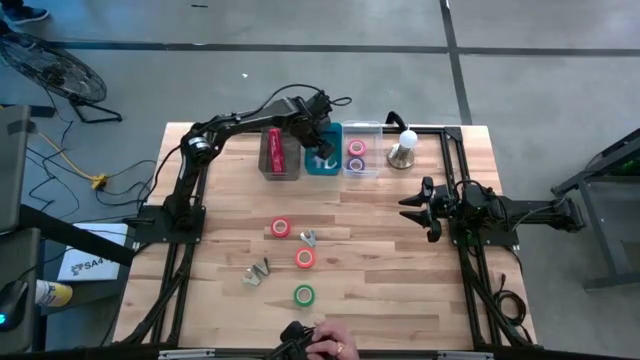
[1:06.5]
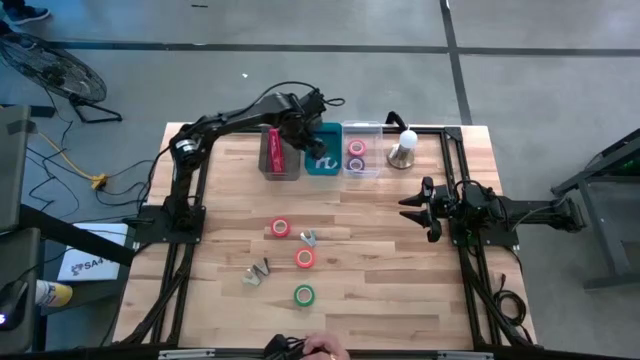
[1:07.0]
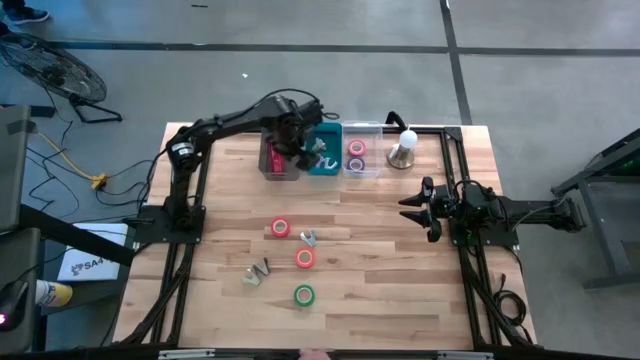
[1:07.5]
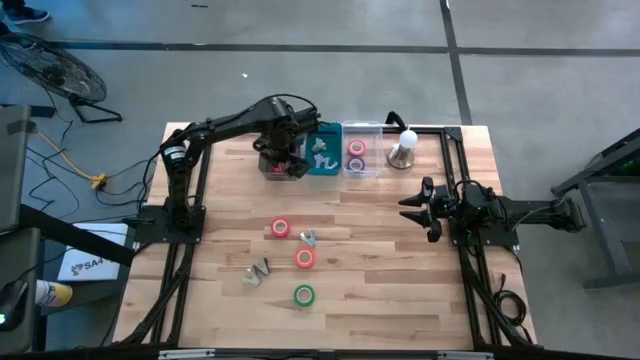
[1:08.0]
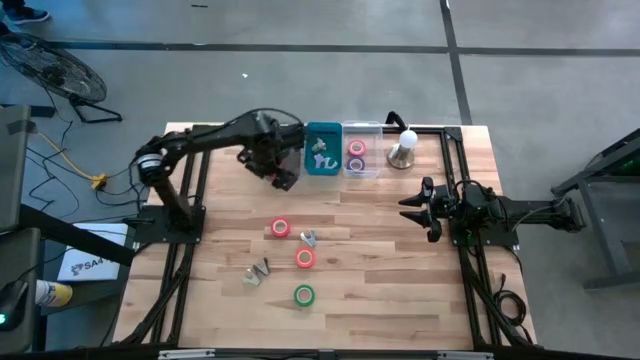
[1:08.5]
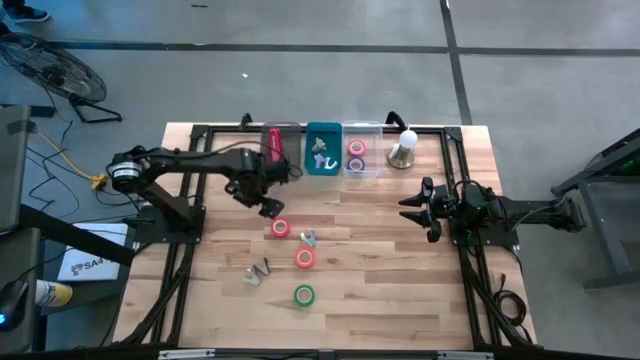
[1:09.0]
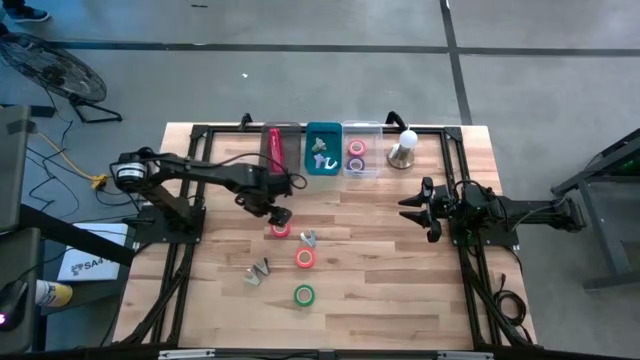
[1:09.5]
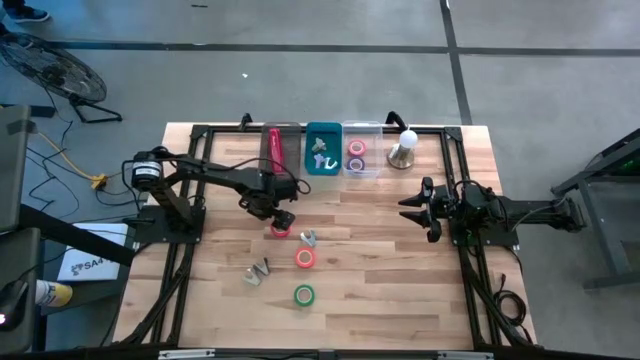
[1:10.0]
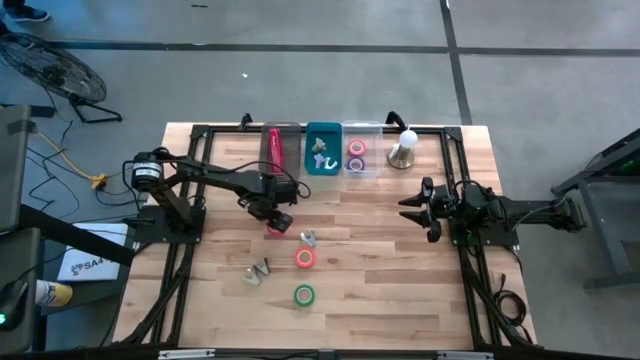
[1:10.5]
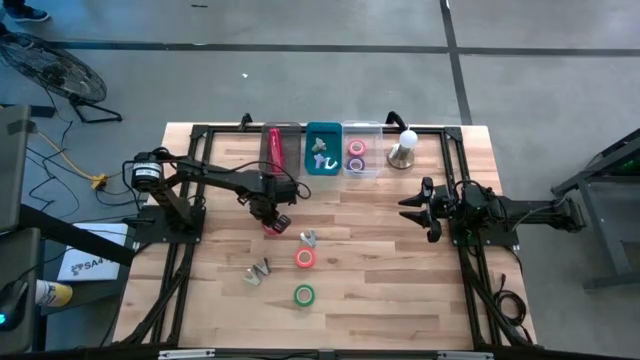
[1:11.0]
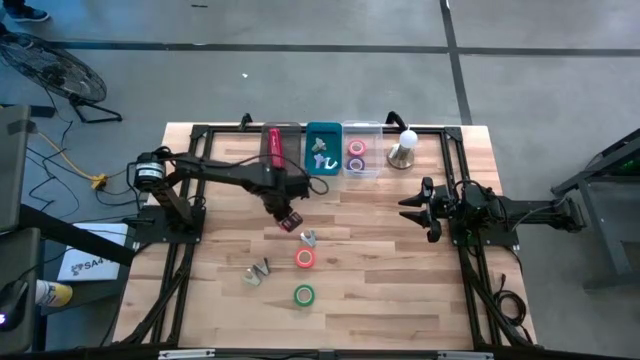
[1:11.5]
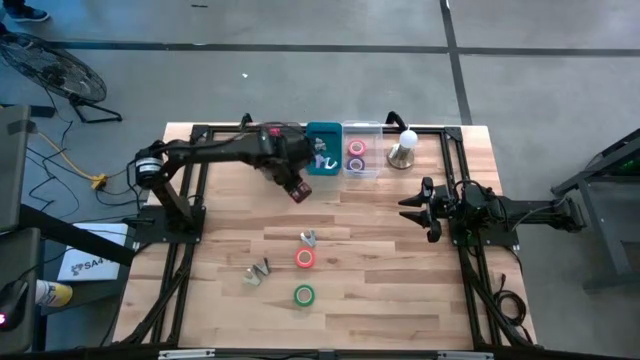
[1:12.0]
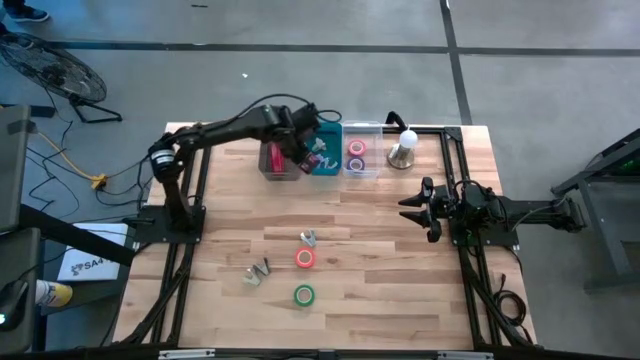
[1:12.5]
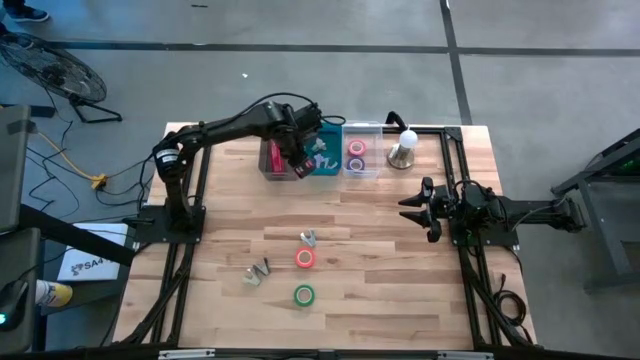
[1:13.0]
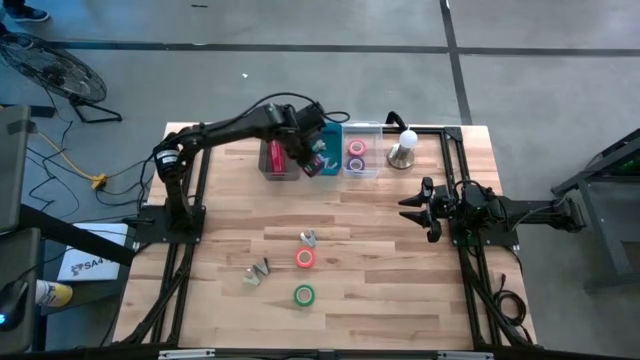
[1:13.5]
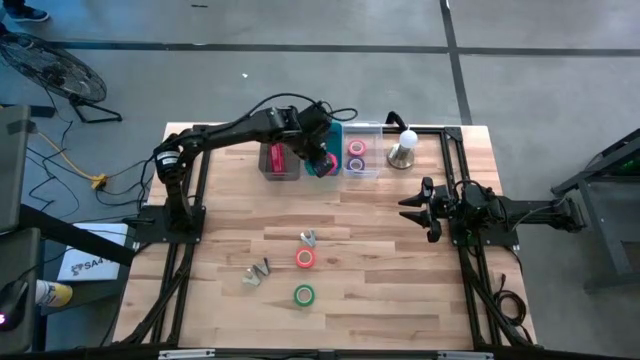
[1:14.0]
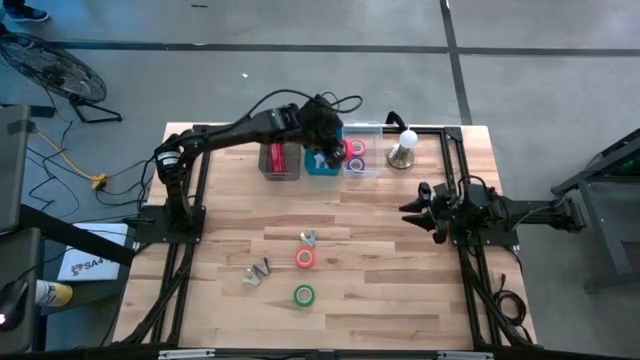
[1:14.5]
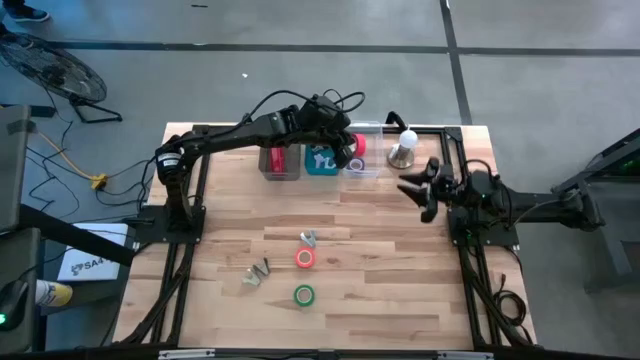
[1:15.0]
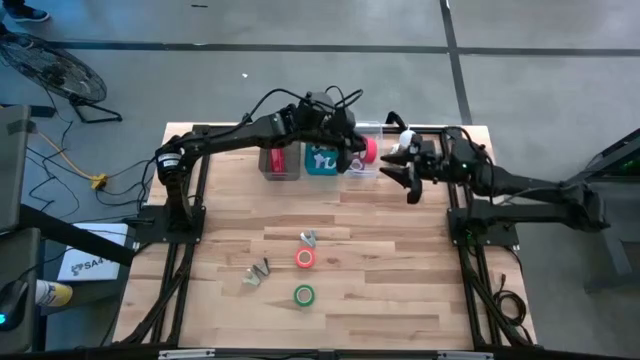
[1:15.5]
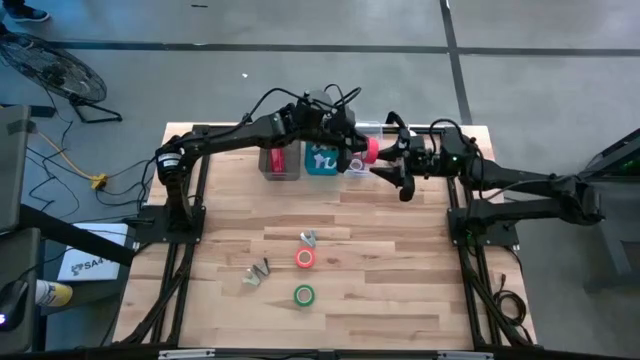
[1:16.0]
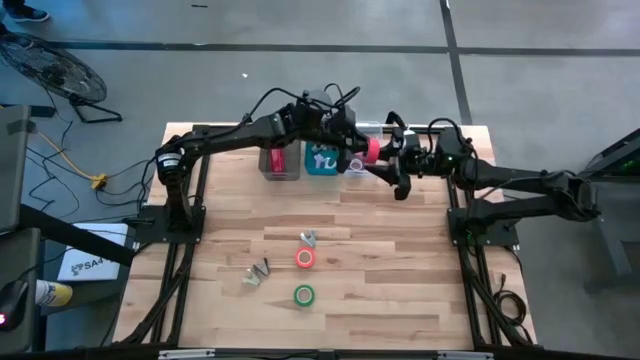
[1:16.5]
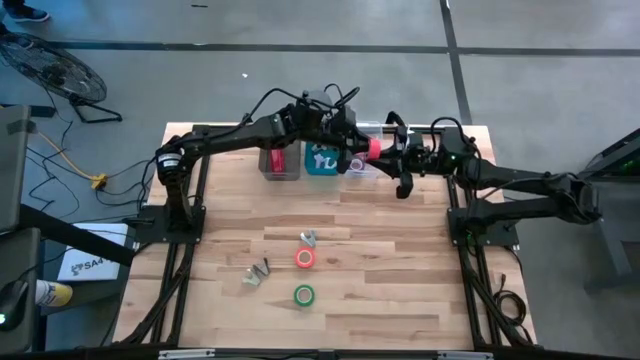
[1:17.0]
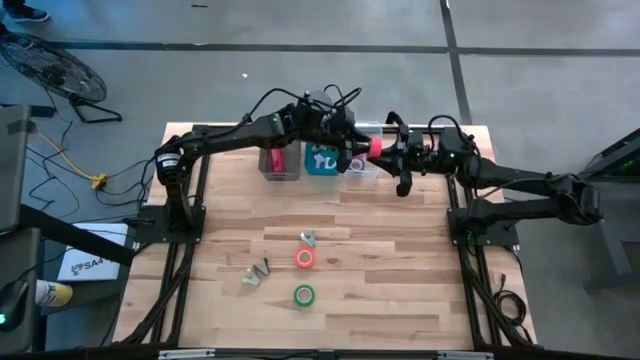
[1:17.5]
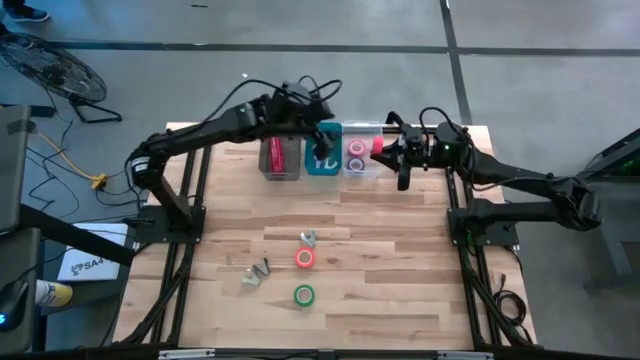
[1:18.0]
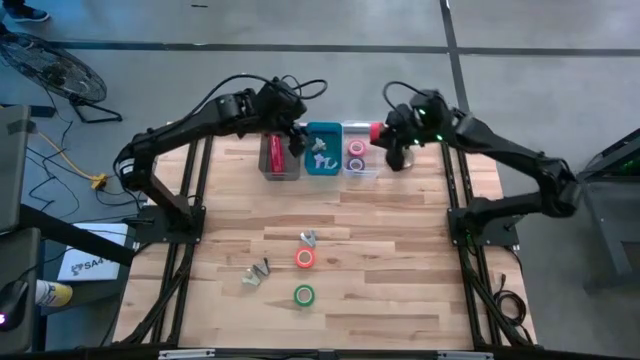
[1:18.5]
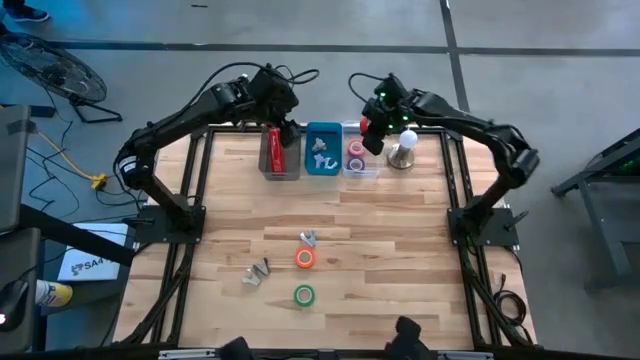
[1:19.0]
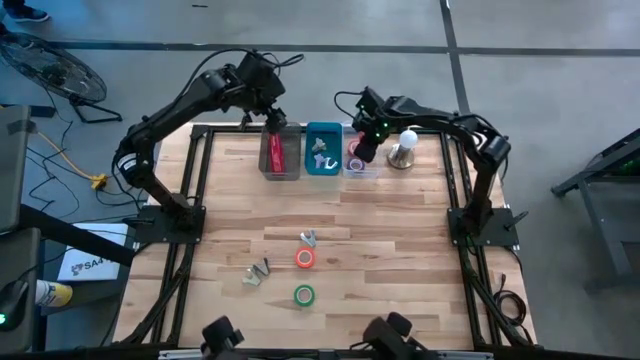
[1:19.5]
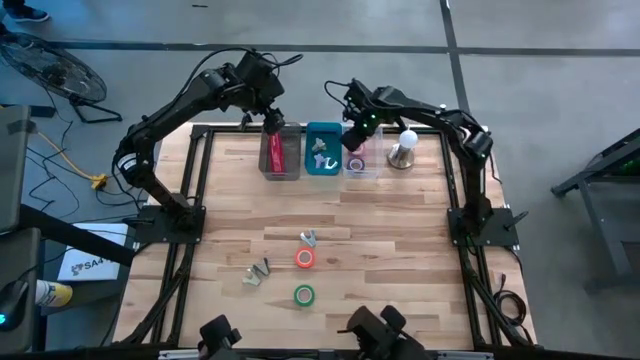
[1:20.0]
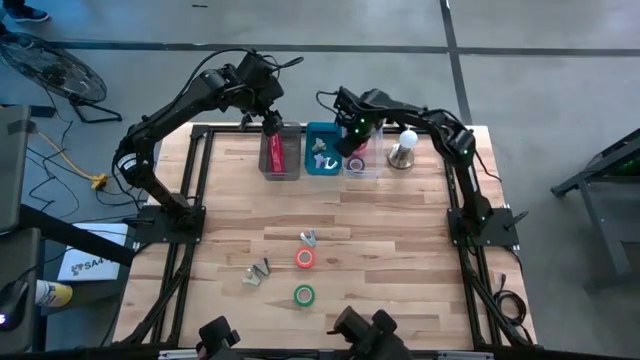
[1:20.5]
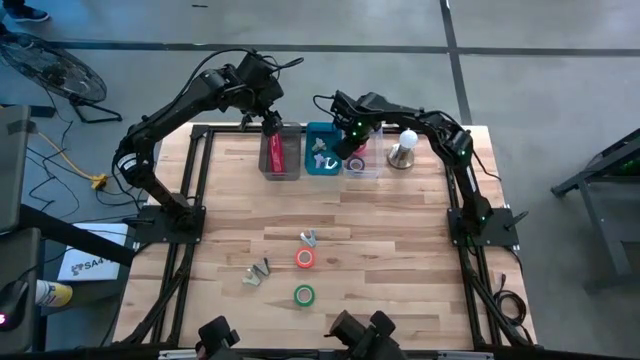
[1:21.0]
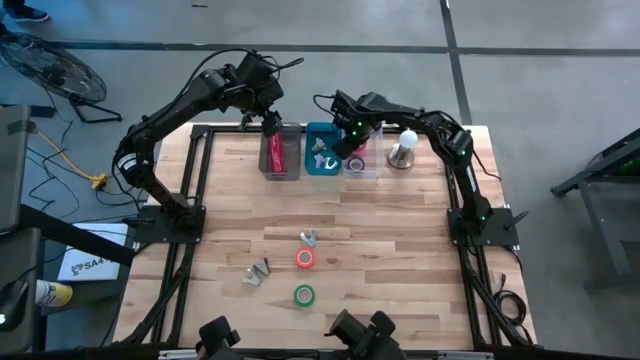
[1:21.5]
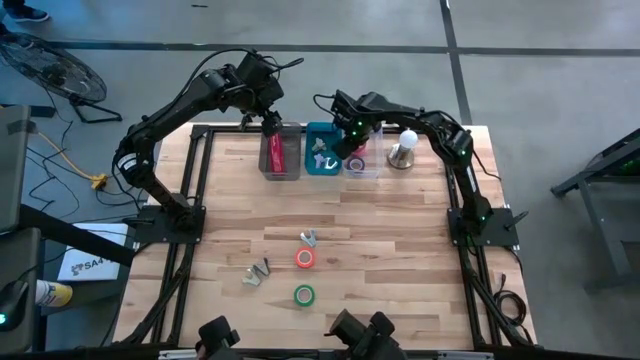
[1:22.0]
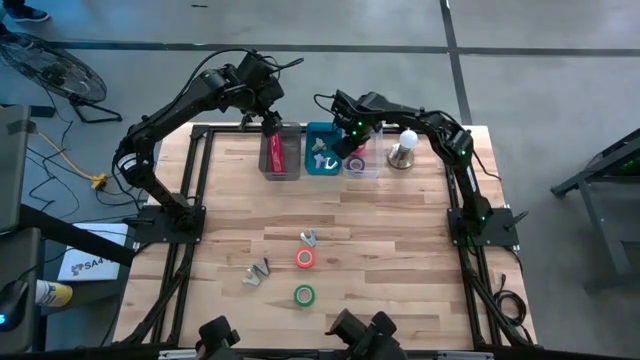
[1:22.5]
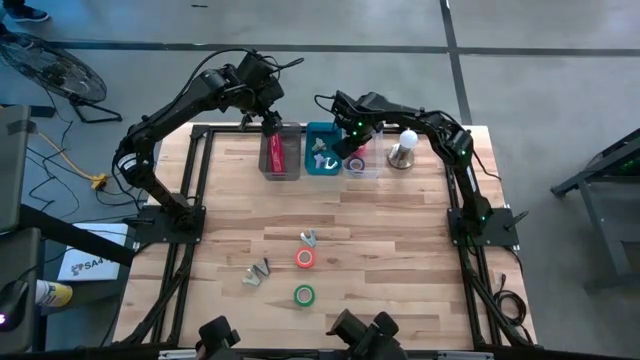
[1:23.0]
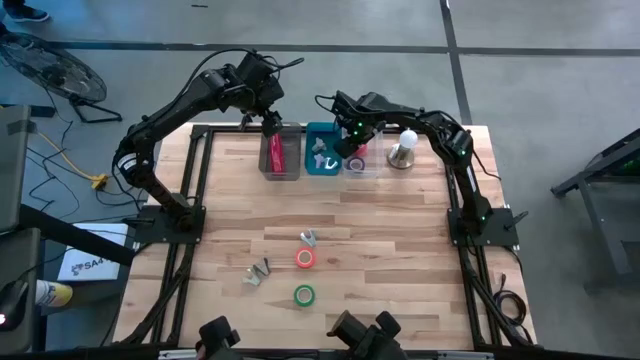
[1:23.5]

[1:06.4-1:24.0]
Task: Pick and place Stapler, Stapler remover, tape
Put the red tape into the transparent bin

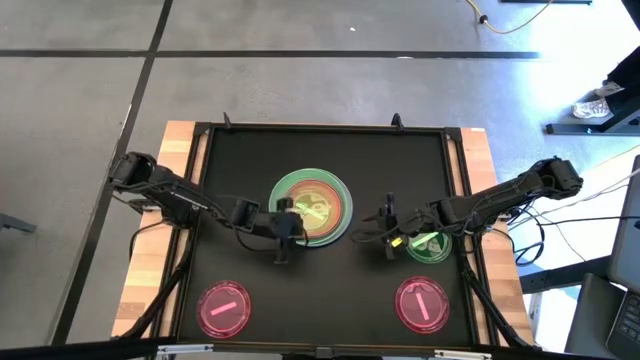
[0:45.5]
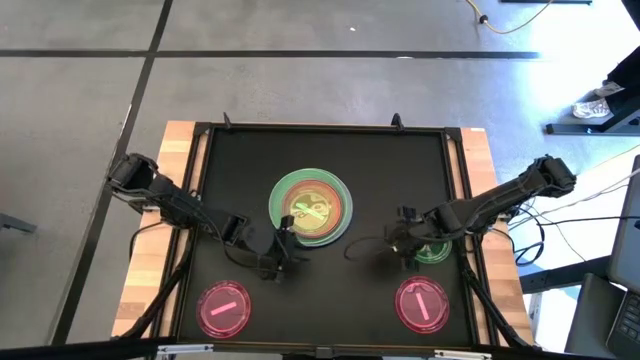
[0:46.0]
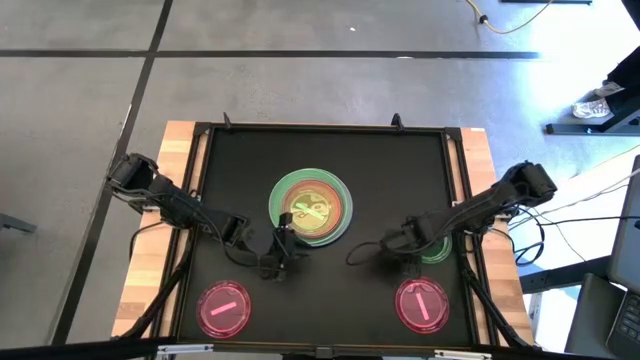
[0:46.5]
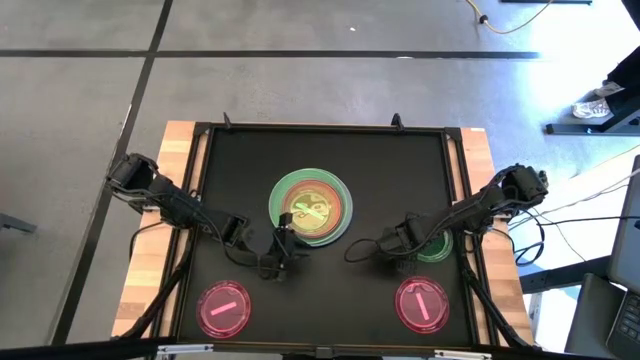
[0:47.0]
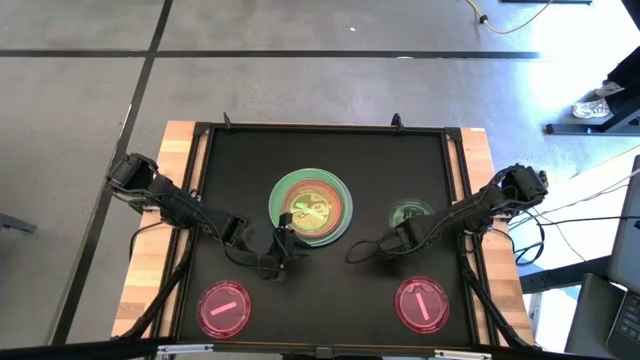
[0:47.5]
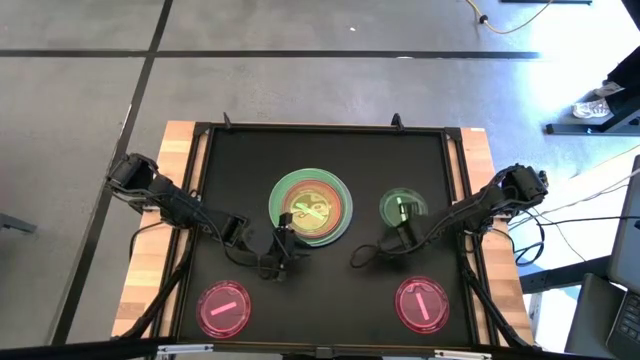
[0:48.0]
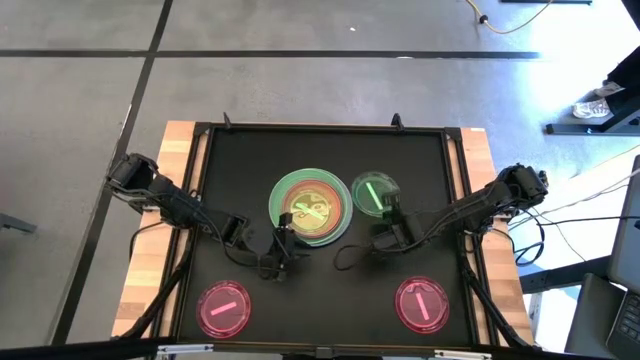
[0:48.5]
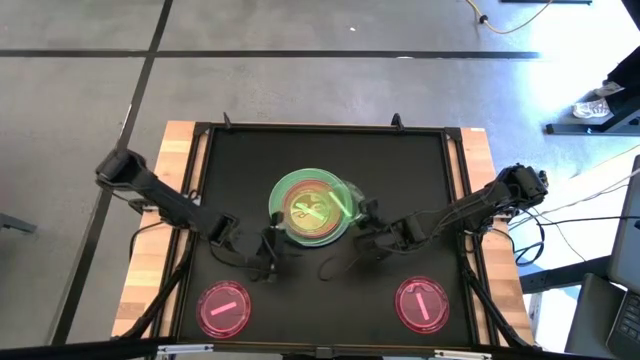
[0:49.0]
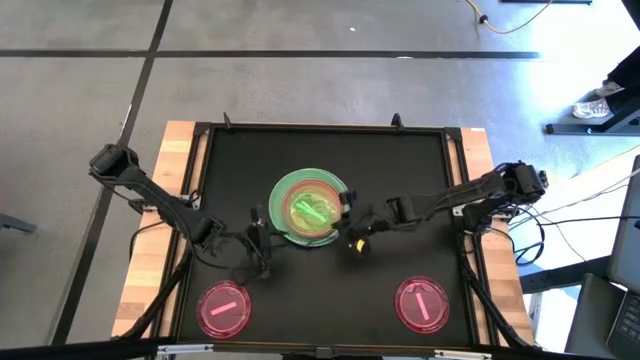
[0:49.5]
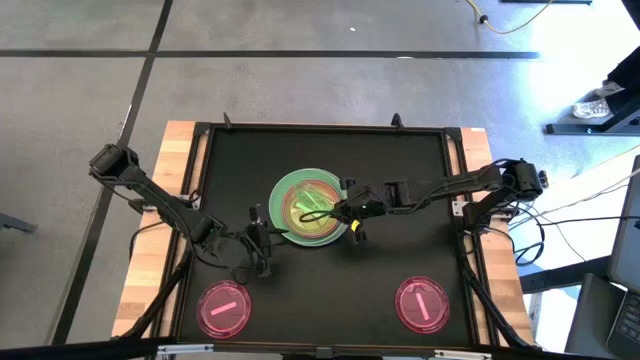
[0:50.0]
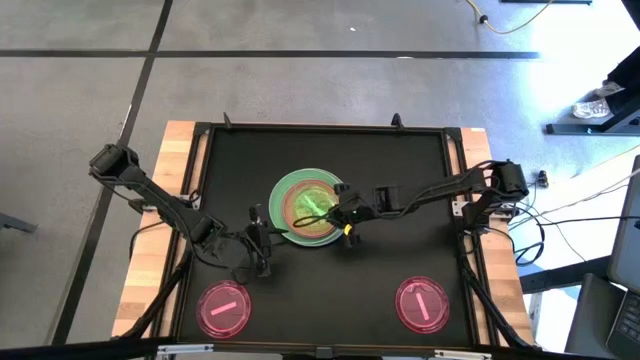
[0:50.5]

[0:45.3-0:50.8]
Task: Stack plastic plates
Stack the light green plate on the light green plate
